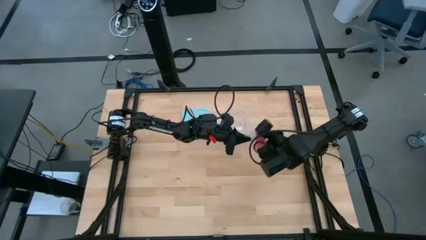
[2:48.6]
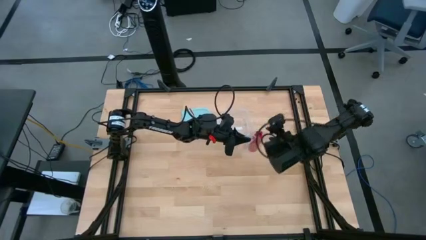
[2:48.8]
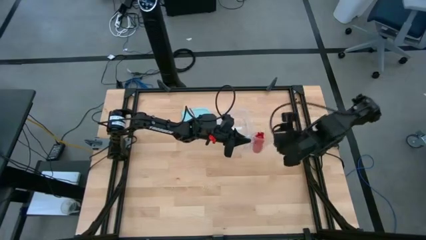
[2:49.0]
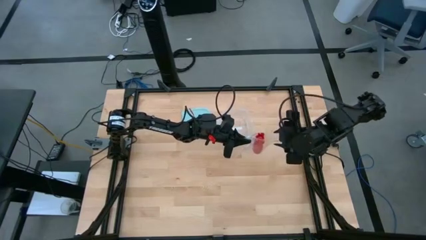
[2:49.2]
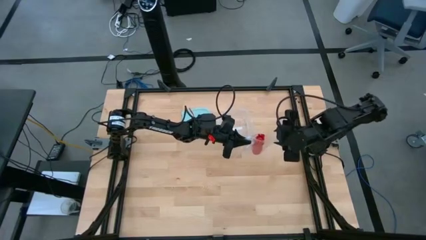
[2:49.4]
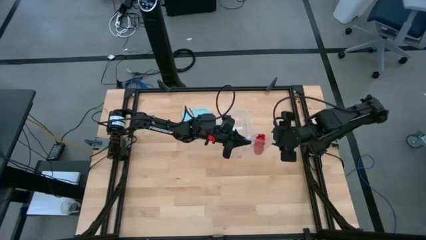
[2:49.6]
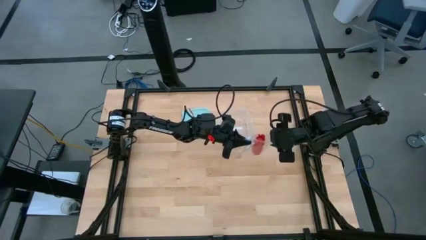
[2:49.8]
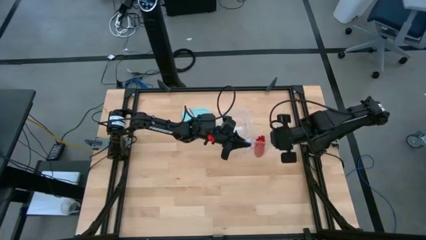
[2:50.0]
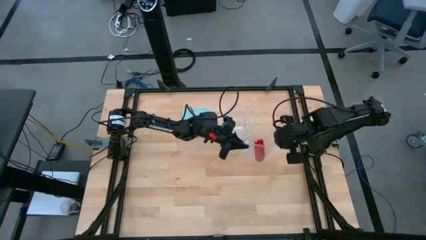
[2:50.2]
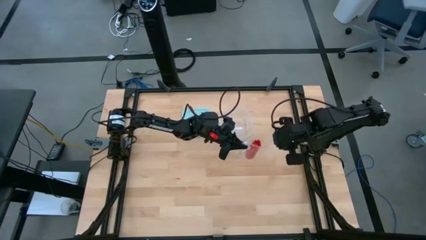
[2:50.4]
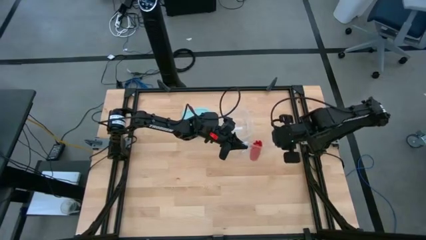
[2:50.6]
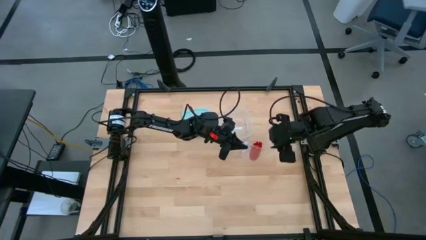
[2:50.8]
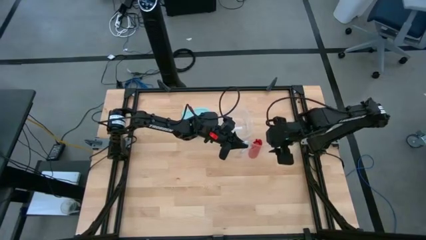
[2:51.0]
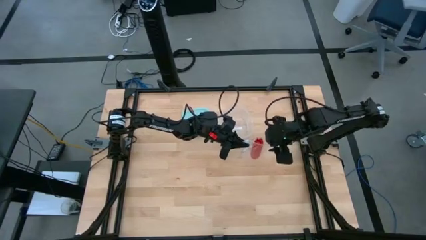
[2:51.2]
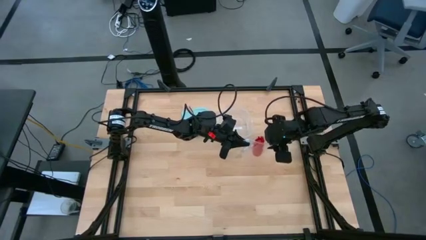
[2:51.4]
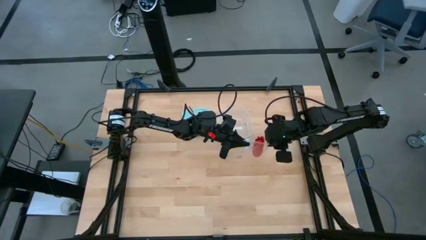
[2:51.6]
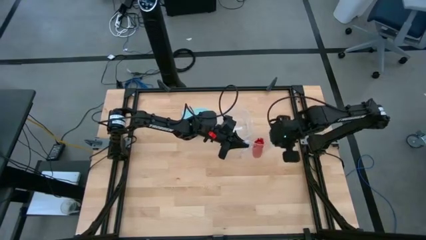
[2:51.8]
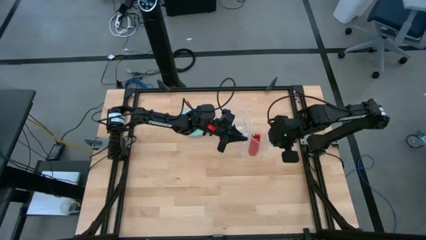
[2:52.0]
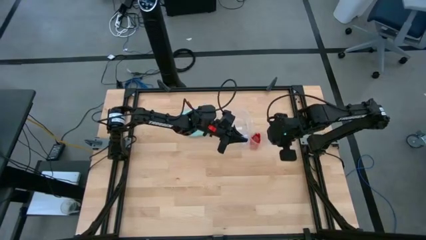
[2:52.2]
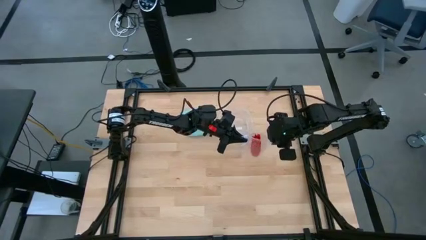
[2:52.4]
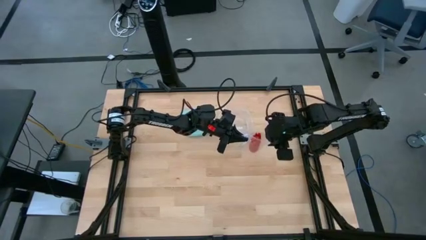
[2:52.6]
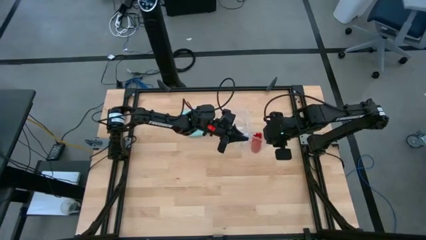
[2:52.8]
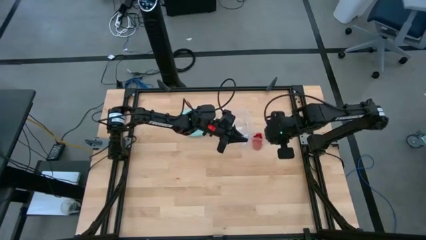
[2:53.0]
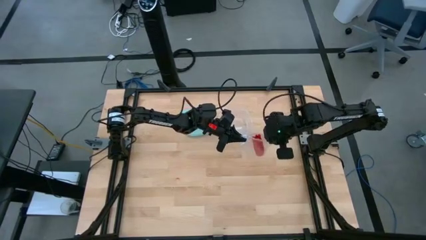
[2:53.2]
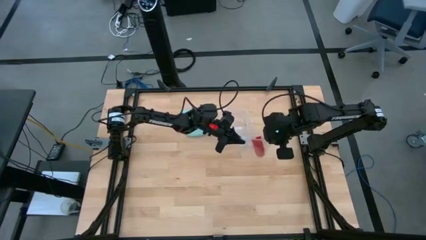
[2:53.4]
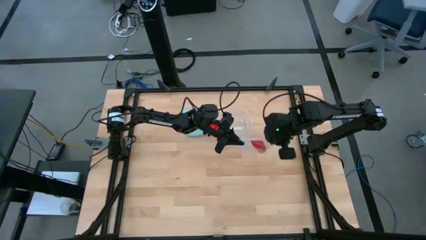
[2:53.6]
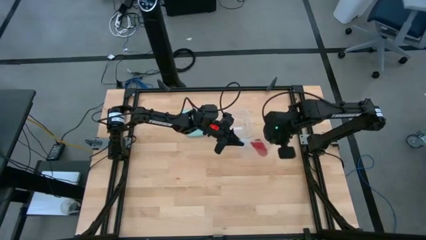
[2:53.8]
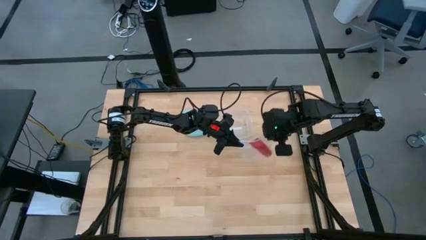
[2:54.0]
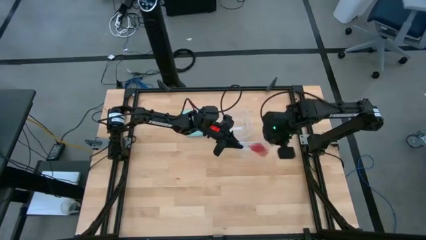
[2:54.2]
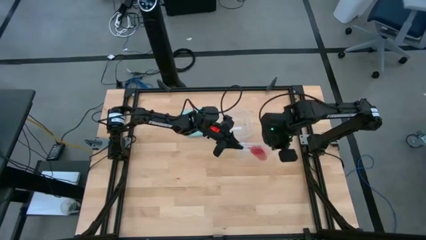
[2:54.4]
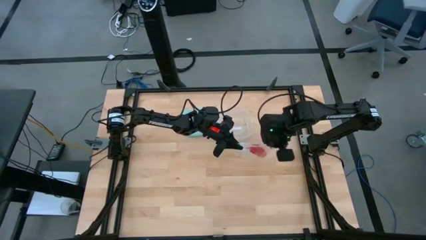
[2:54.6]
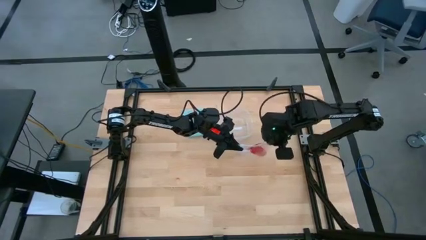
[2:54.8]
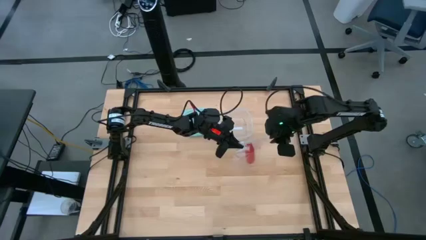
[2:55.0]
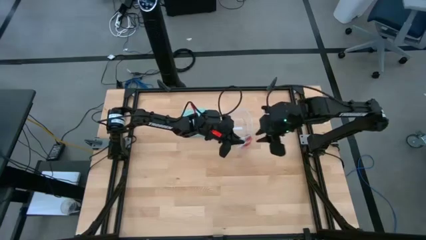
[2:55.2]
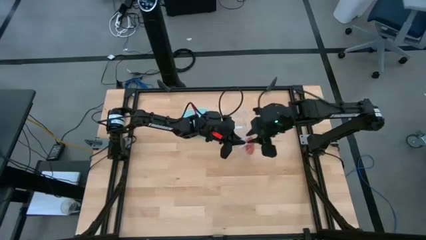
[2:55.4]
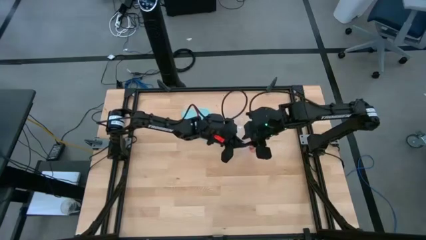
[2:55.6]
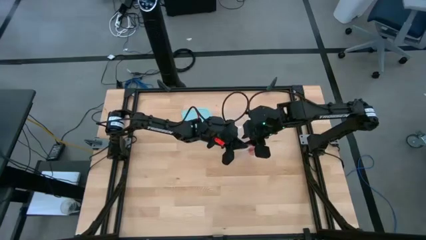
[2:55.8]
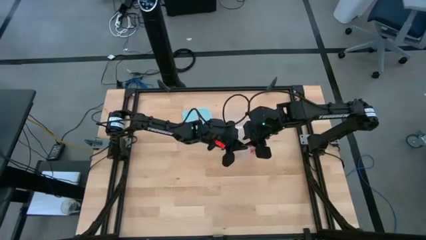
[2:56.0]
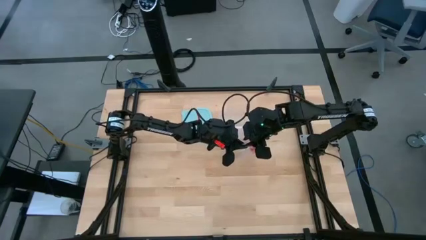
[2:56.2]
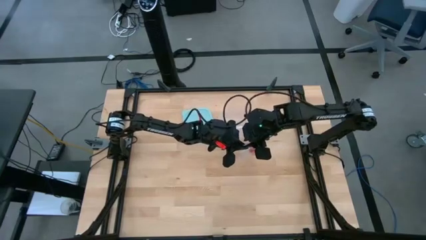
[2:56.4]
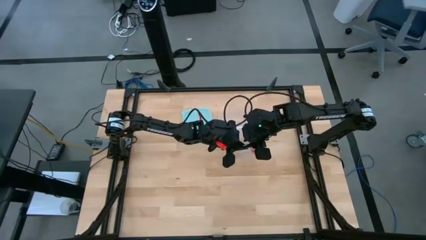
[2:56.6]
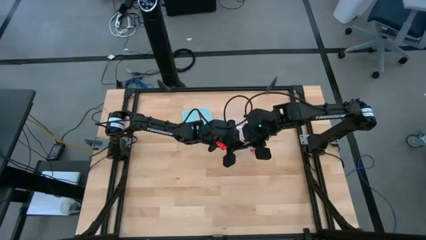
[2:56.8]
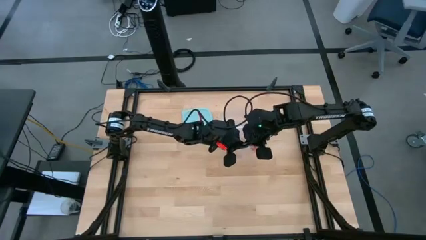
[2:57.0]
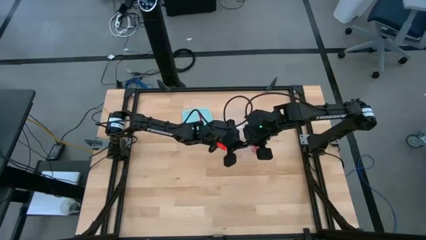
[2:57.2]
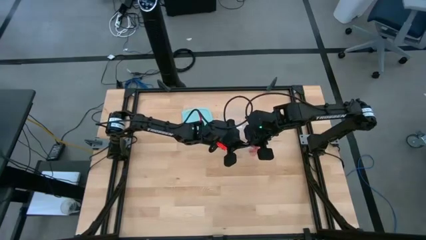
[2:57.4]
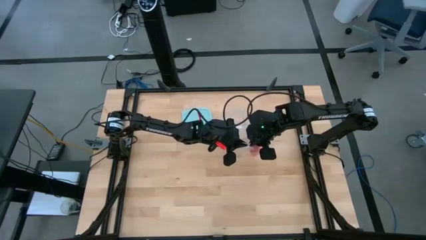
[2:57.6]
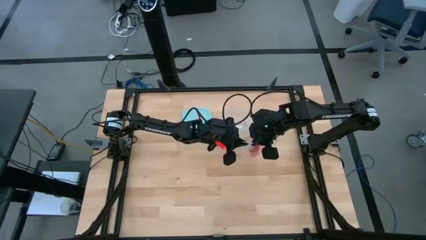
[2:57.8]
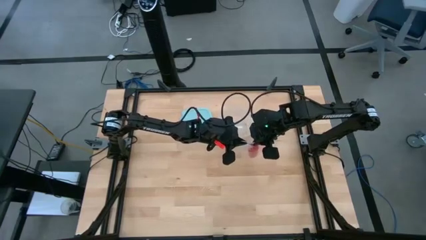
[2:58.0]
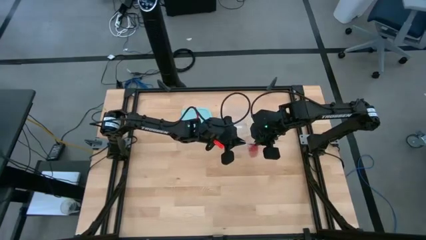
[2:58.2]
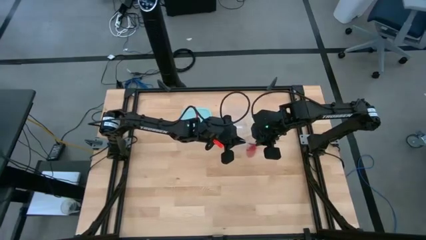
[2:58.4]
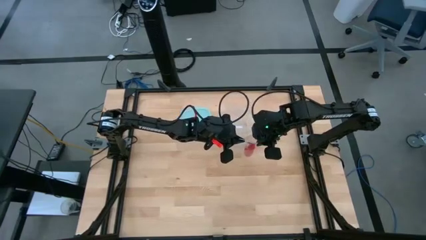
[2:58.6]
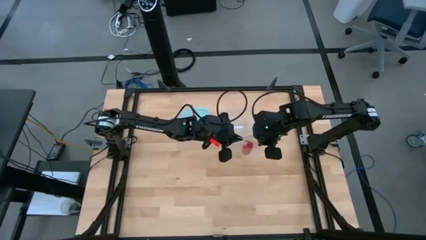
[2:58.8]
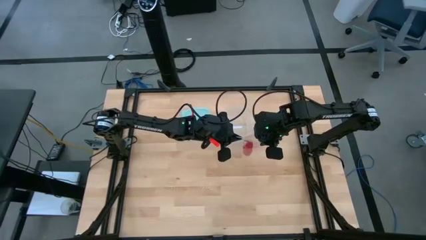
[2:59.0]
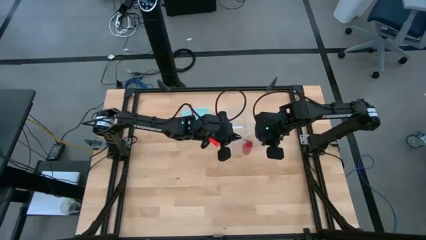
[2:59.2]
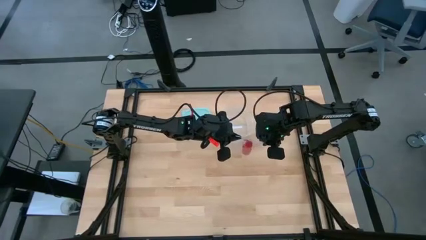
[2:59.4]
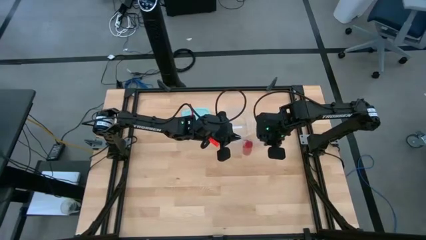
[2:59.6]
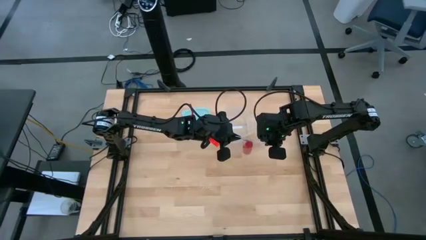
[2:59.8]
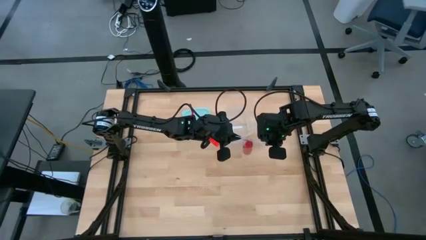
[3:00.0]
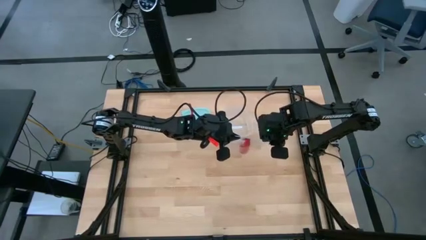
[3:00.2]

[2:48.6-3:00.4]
Task: Roll bandage
Close the transparent zip lock bag

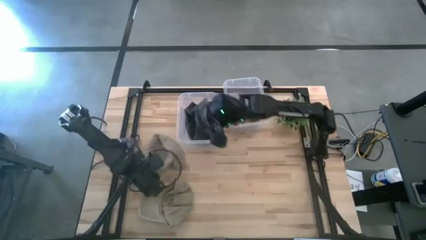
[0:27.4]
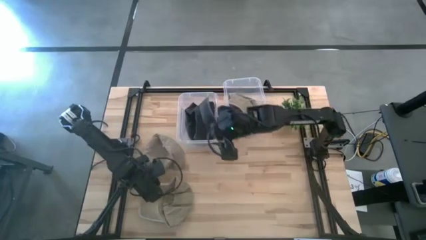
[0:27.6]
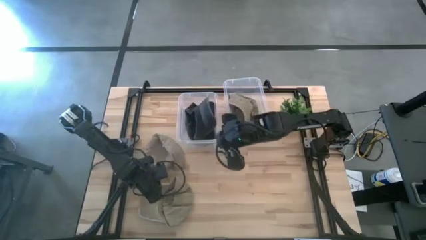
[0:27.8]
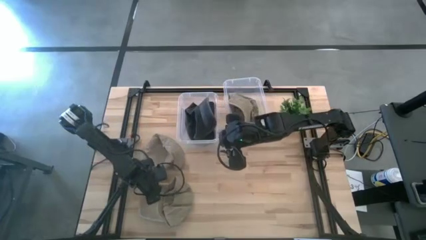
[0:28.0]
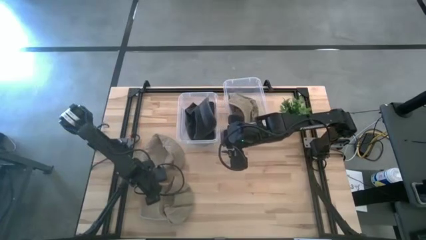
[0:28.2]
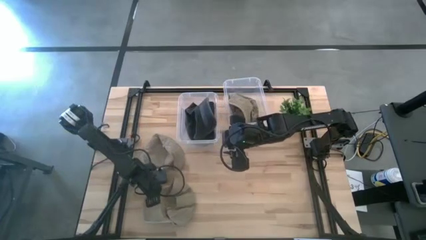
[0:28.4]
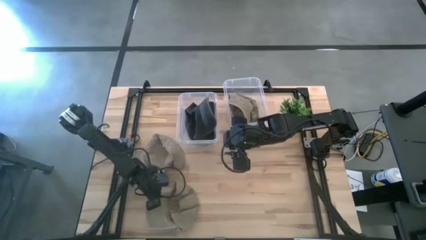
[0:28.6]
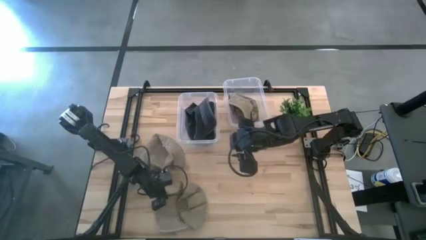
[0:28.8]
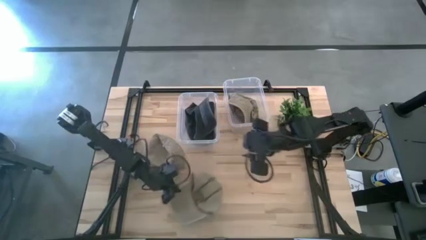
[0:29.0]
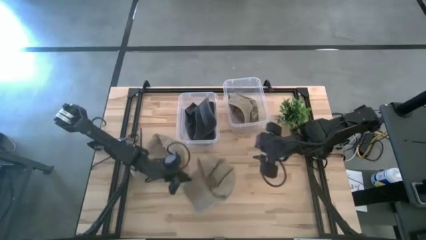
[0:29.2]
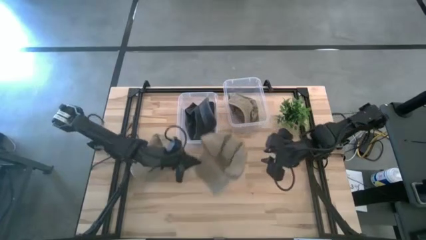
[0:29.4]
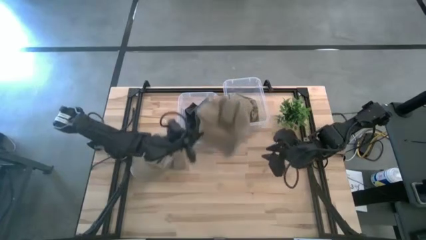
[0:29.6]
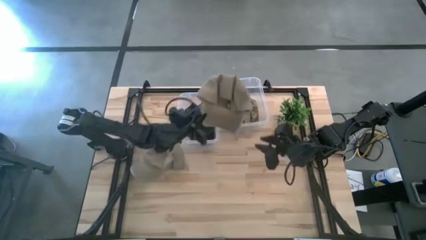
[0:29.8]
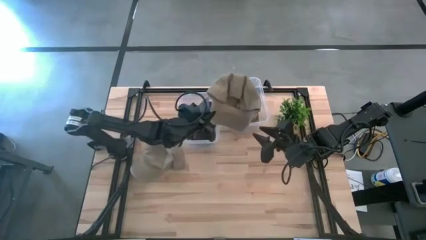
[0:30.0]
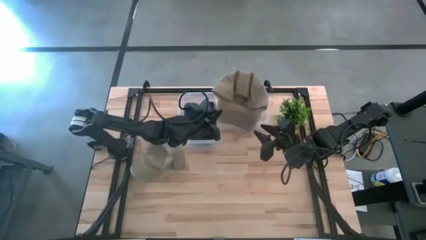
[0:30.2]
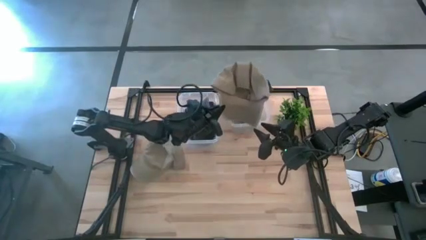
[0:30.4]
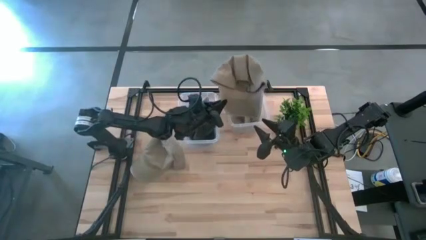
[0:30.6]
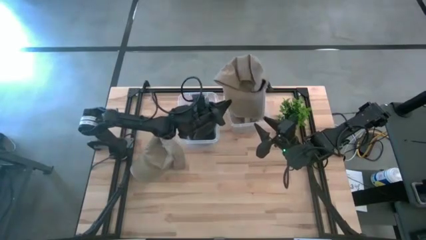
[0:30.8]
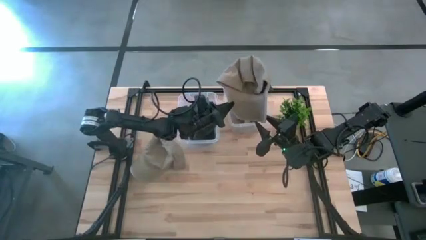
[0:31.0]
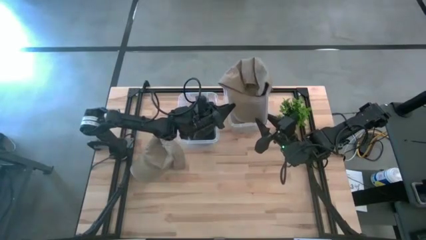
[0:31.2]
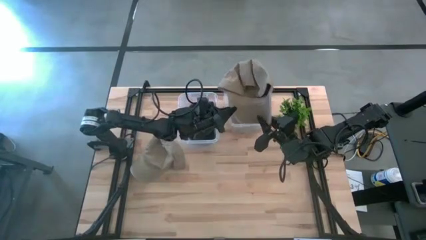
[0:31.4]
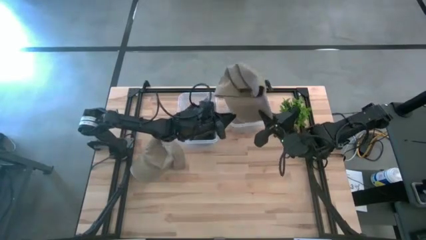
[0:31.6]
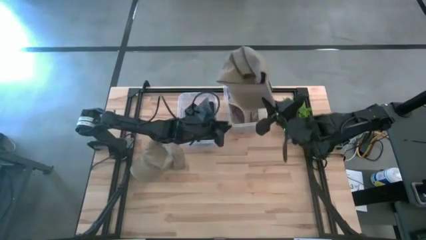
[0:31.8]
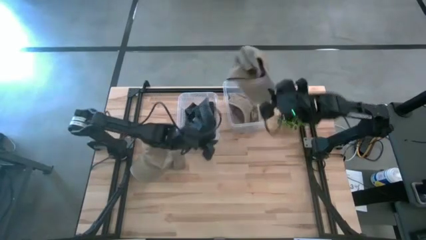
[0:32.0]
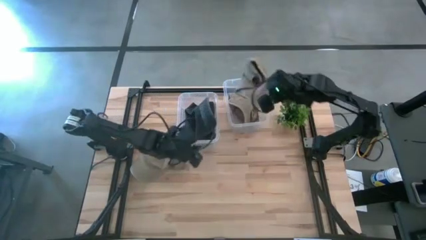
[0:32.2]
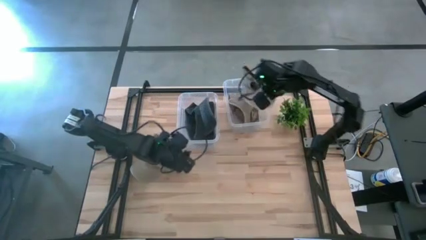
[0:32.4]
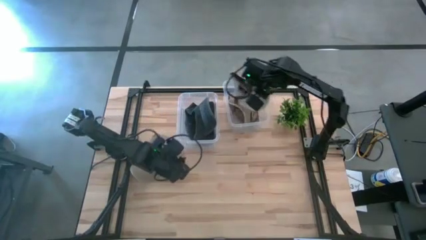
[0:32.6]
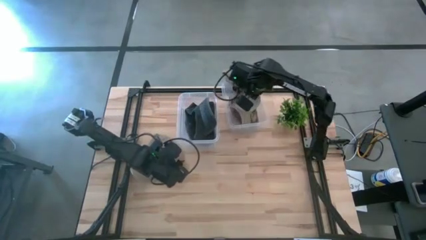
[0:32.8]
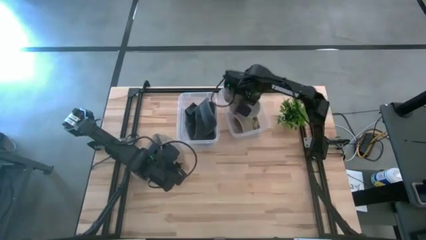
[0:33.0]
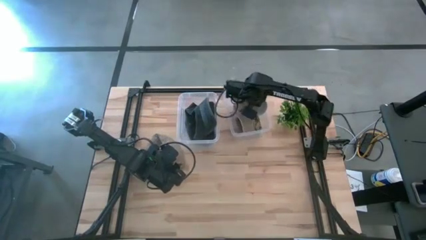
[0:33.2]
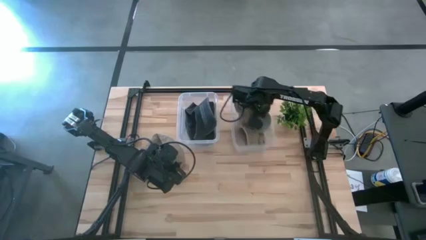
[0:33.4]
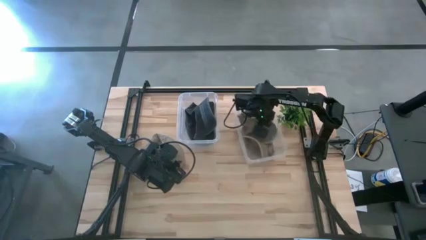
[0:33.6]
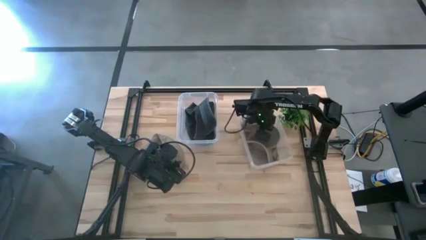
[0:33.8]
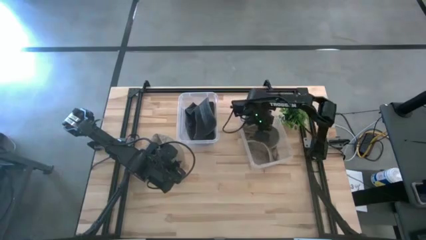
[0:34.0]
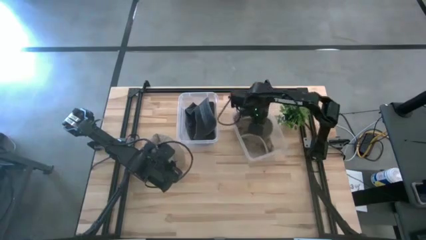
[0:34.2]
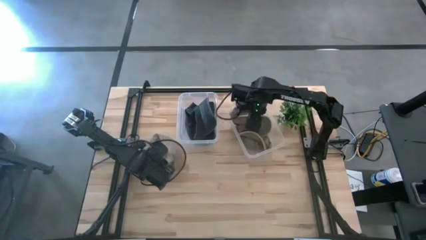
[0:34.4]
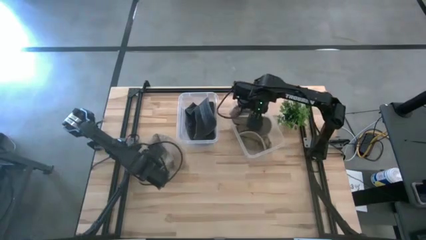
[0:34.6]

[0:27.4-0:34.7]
Task: Pick & Place hat
Put the bottom brown hat into the right transparent bin
